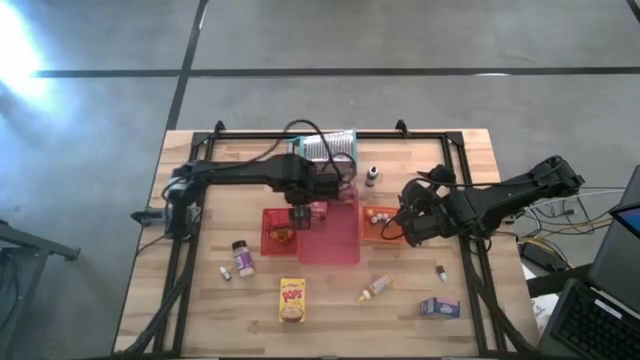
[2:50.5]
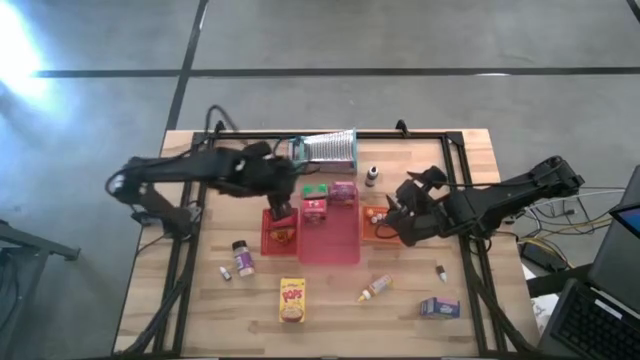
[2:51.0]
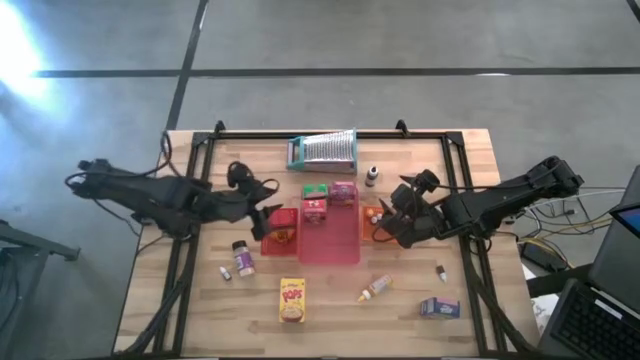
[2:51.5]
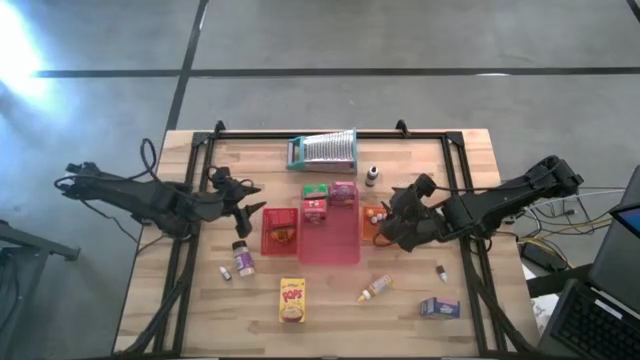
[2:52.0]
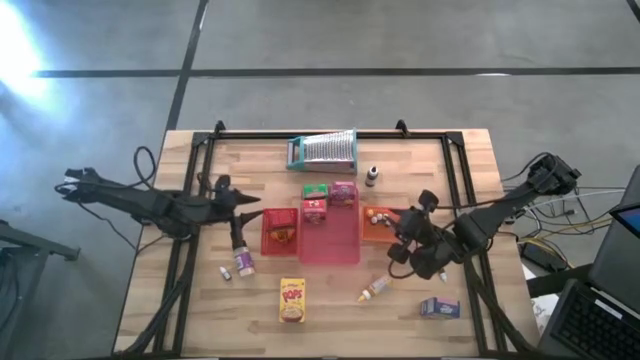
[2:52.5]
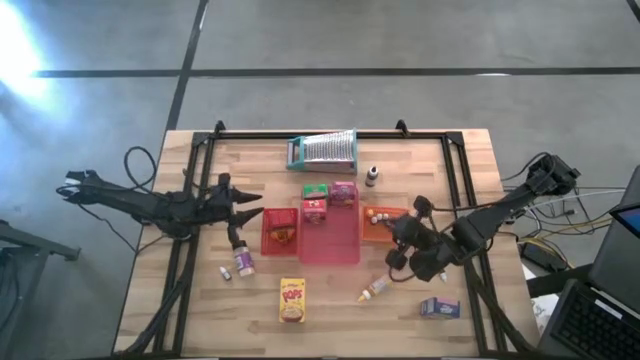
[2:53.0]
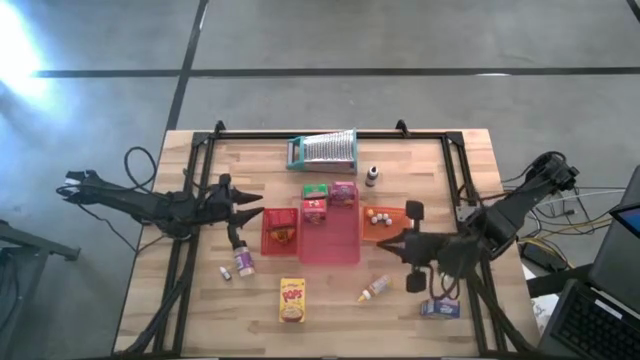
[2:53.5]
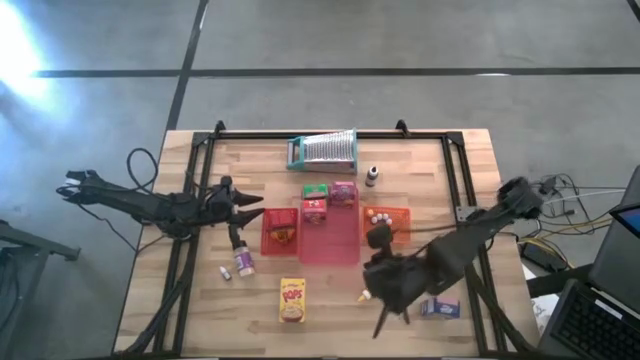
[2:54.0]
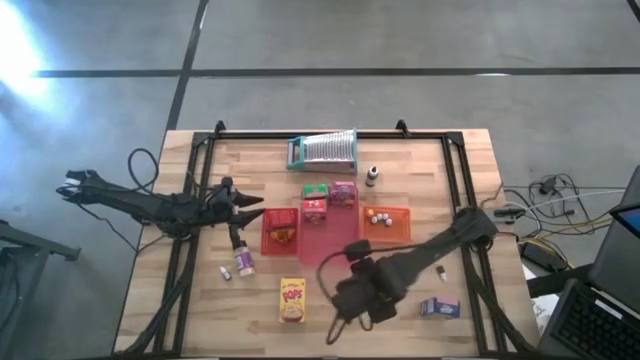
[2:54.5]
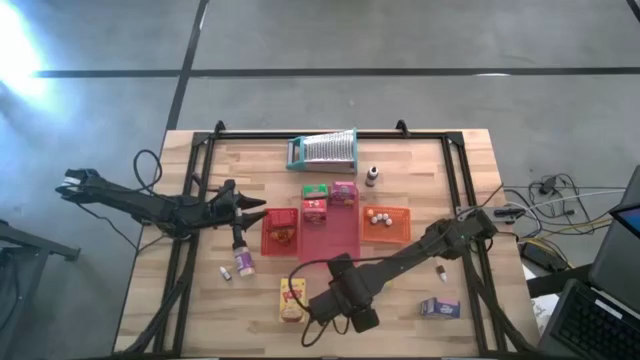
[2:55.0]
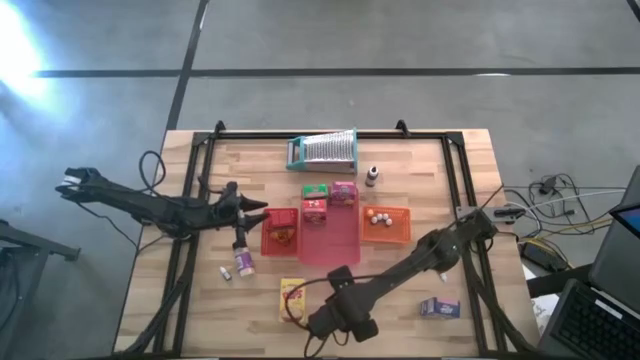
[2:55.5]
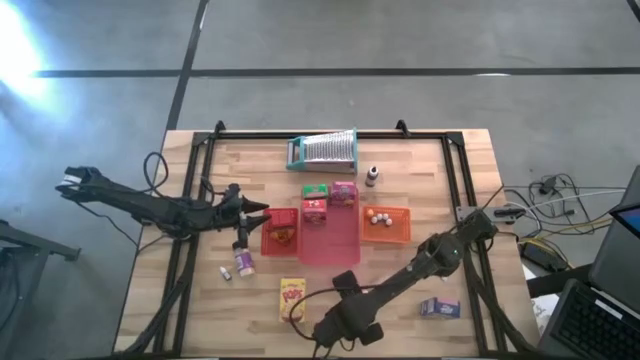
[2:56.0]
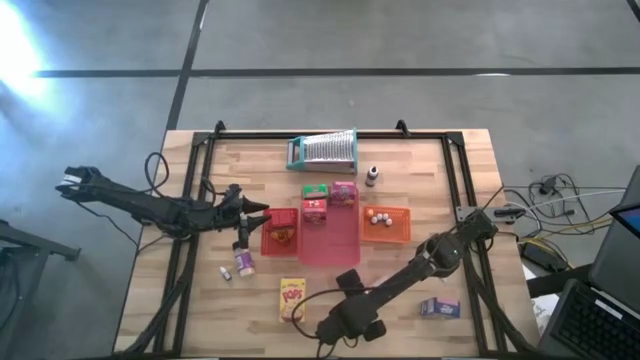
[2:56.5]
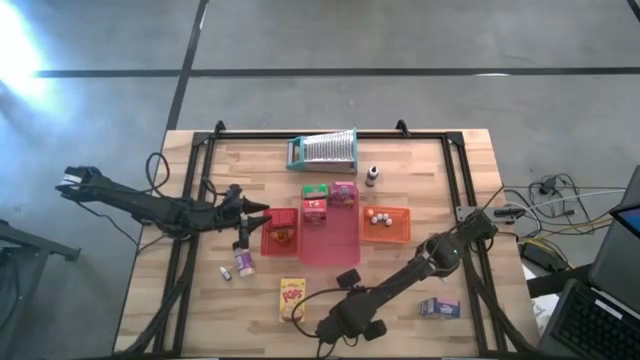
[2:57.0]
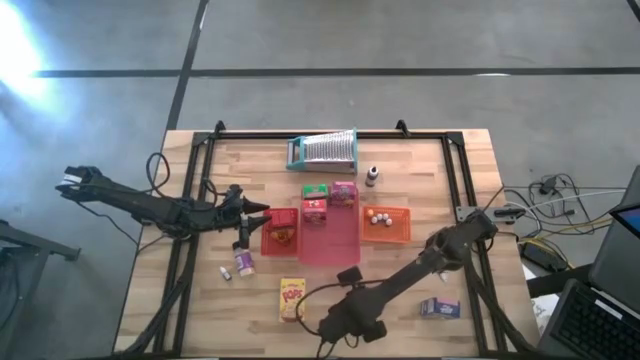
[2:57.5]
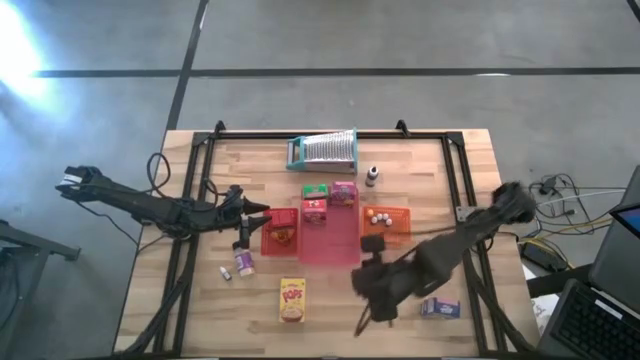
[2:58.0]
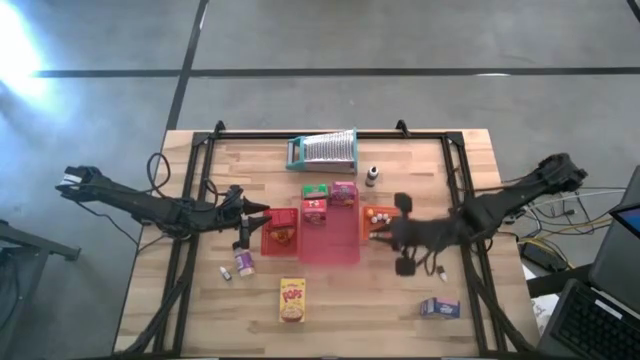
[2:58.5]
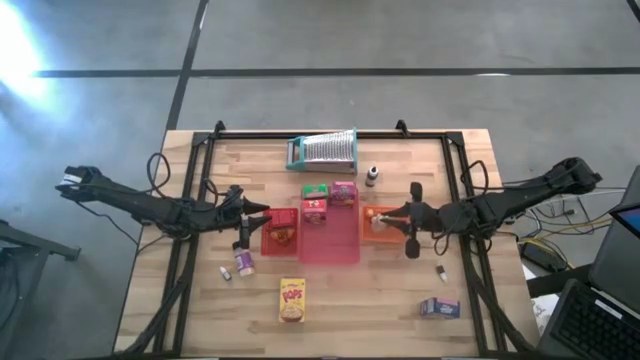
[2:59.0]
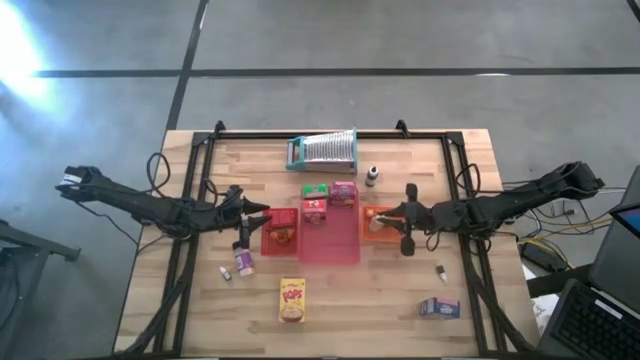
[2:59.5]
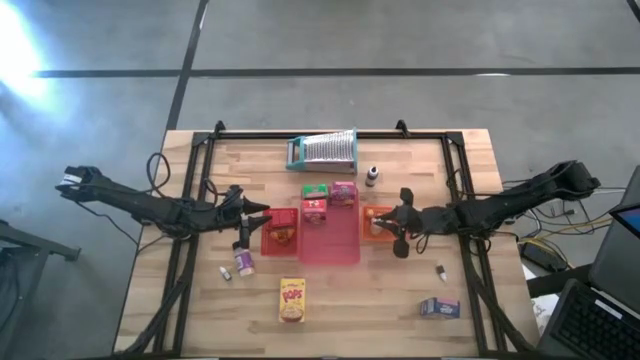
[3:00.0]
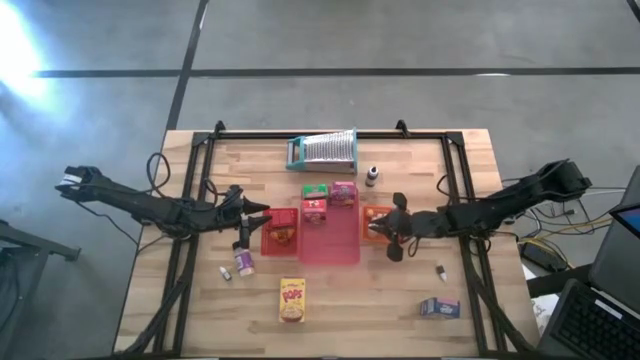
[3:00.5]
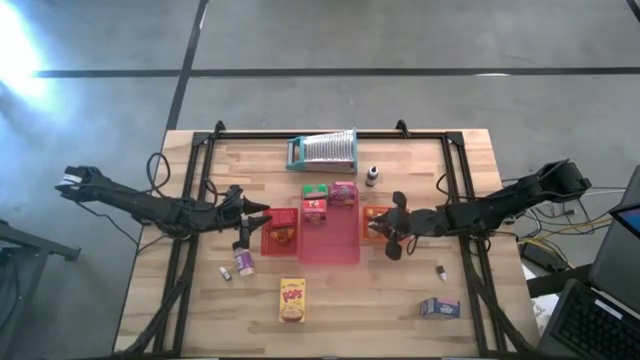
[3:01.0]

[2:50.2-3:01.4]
Task: Pick & Place Kitchen Items
Put the large yellow food coloring bottle into the orange bin

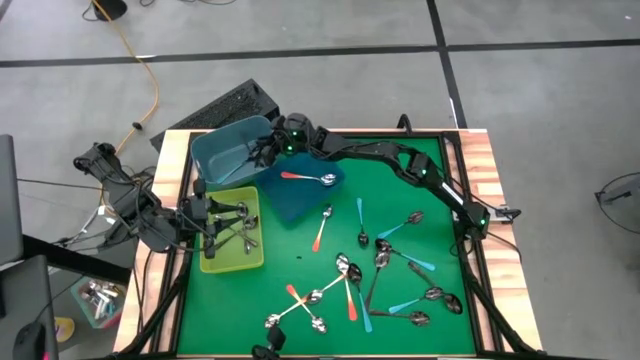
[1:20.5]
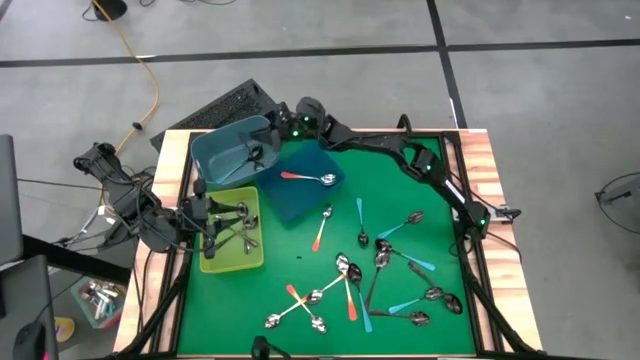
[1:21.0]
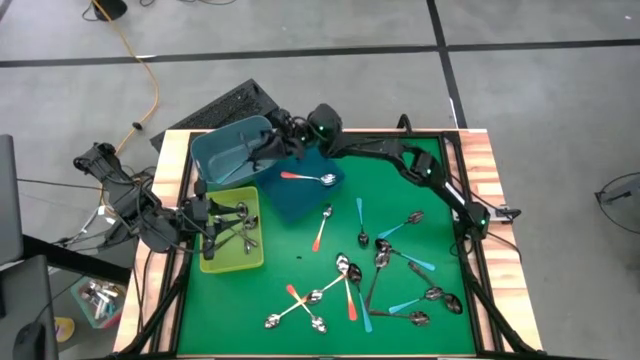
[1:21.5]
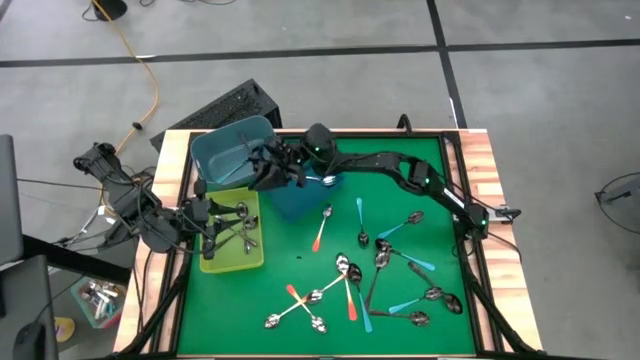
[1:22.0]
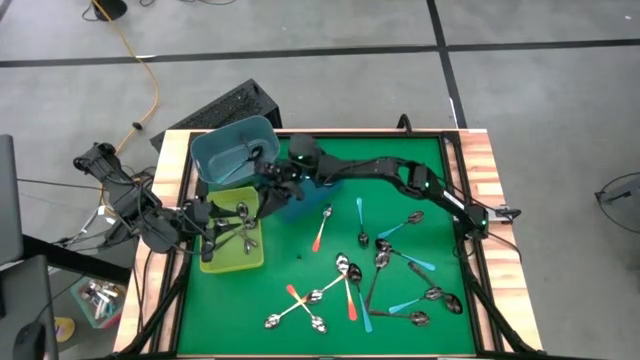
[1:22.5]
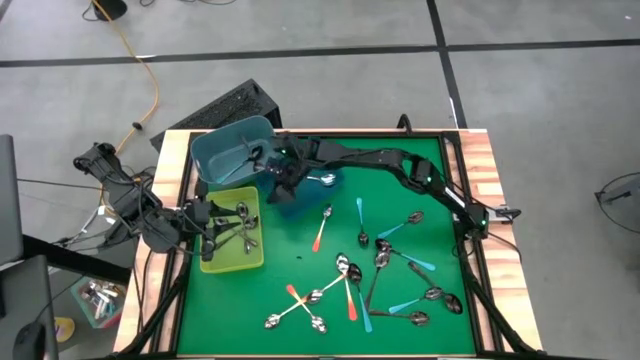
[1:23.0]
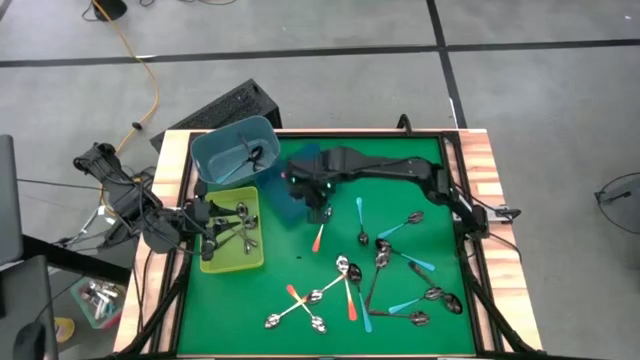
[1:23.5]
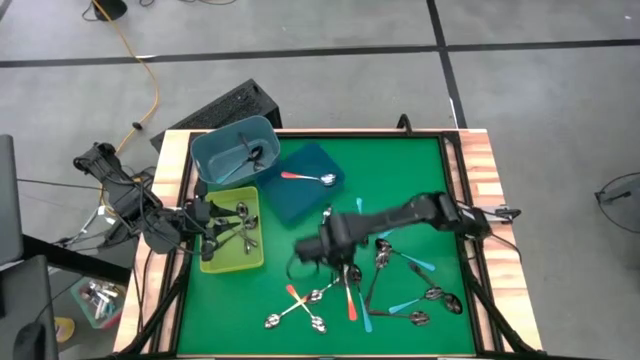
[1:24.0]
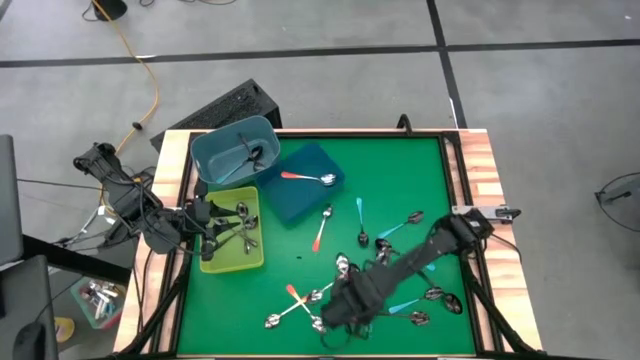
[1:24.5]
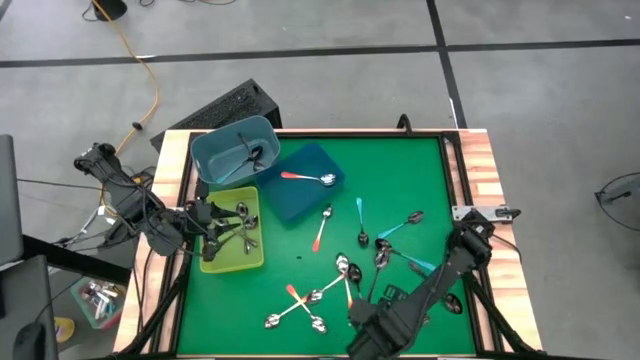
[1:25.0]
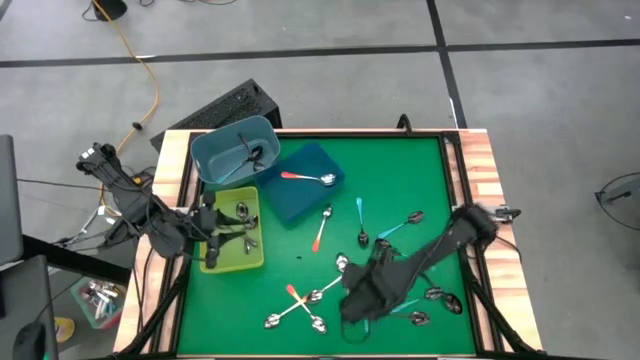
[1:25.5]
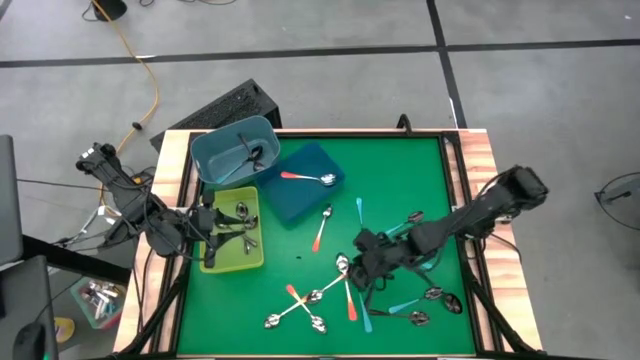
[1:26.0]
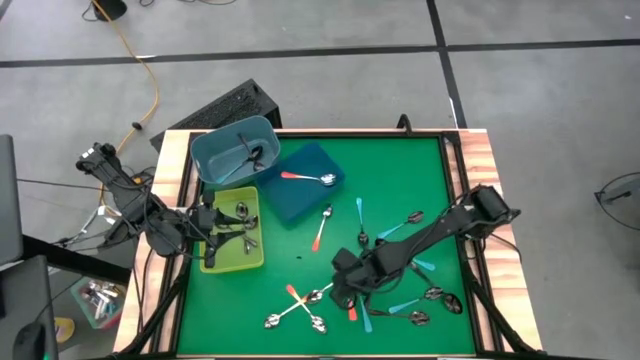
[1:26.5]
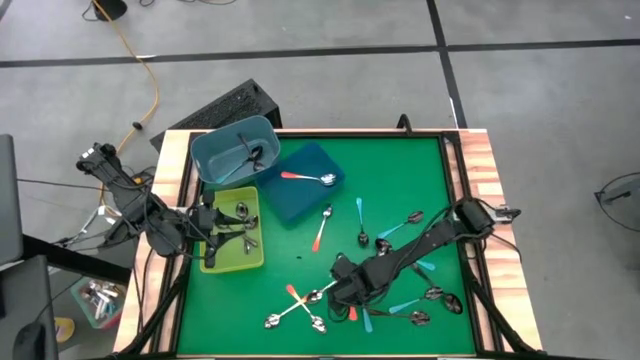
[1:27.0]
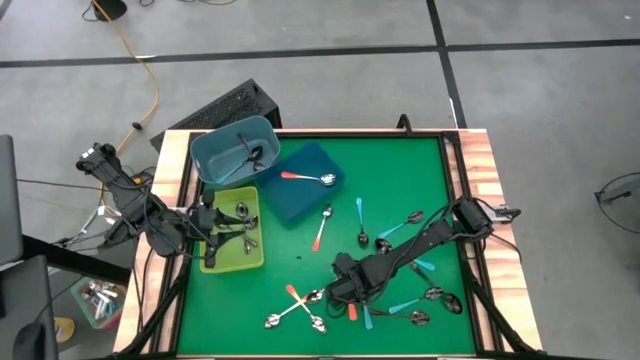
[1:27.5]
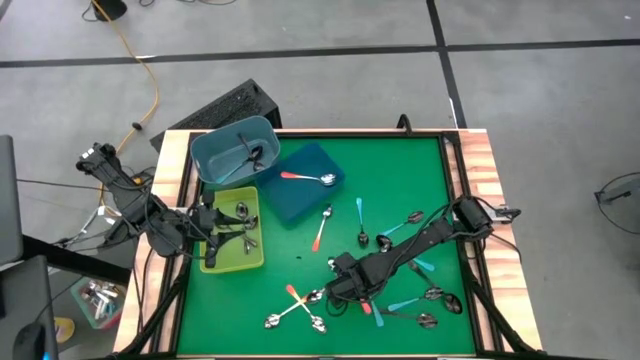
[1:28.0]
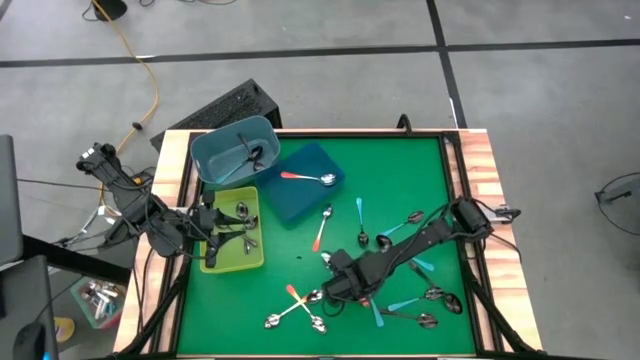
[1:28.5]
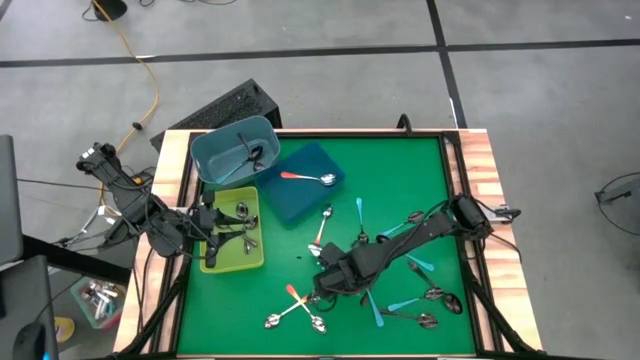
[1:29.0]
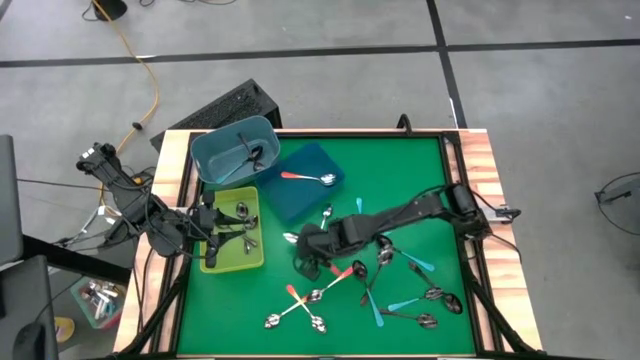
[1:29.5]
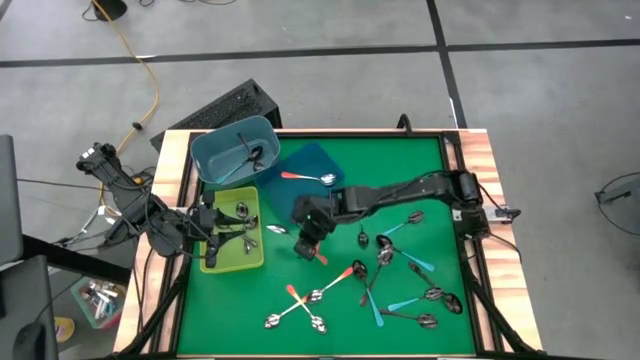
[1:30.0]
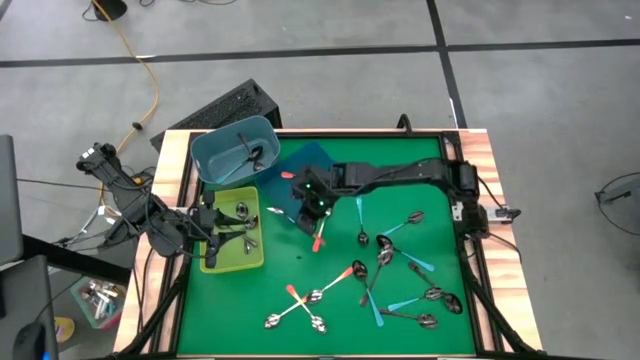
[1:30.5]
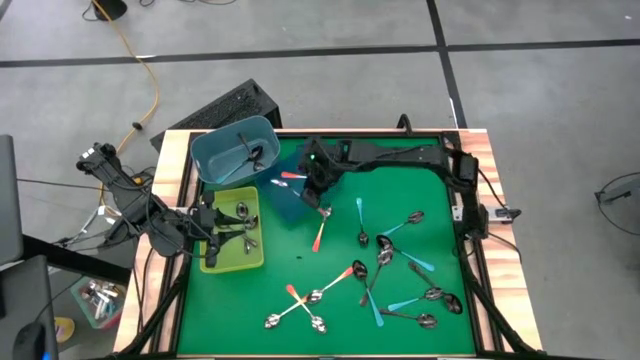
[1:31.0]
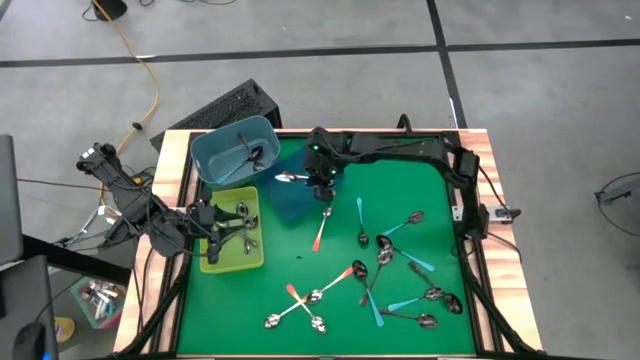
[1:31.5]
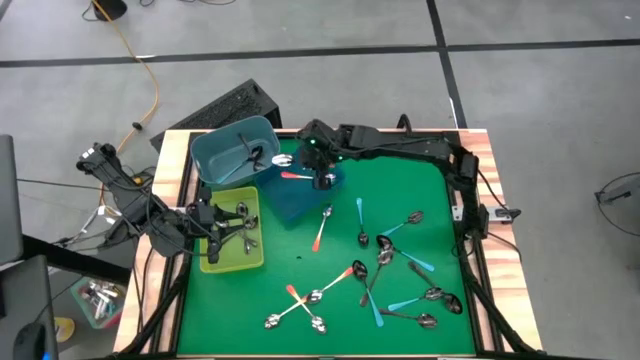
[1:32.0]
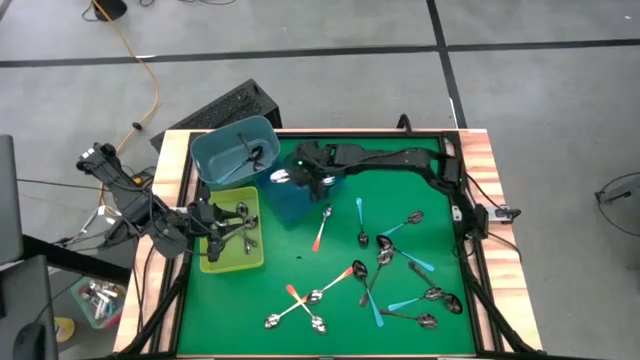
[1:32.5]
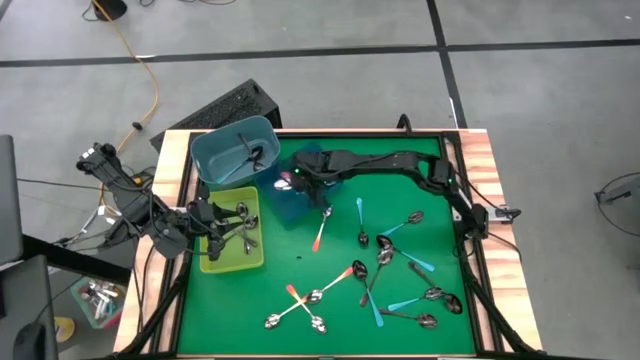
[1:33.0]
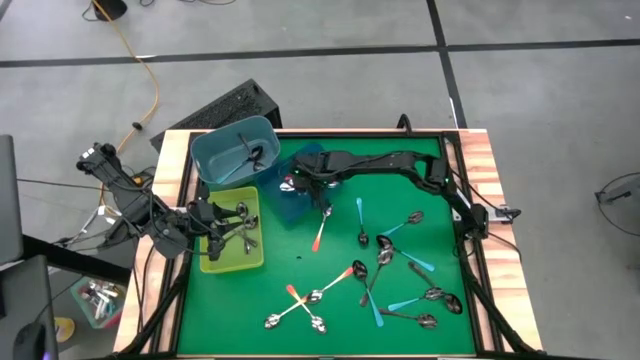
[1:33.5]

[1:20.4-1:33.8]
Task: Sort silverware by color (type)
Put the orange spoon into the blue bin
